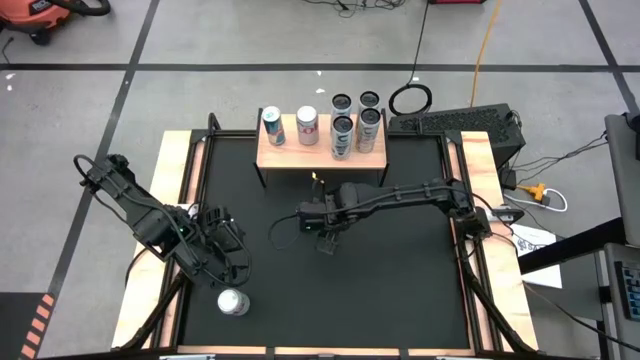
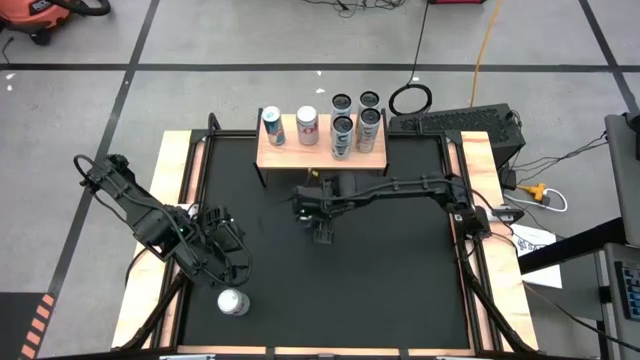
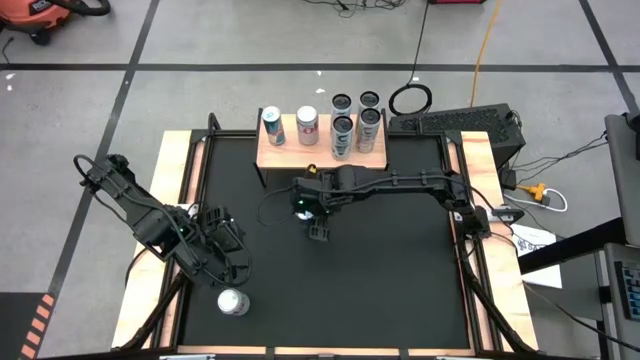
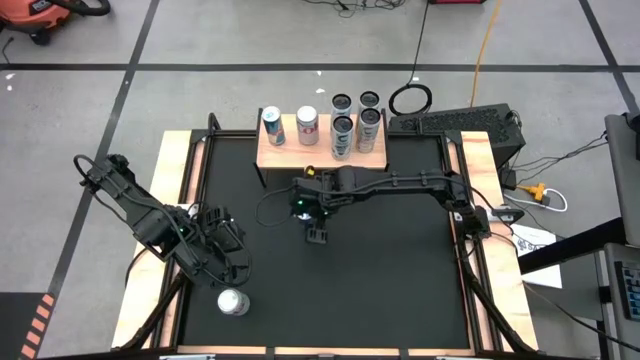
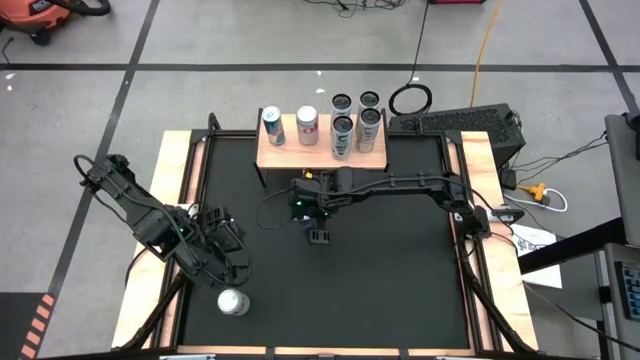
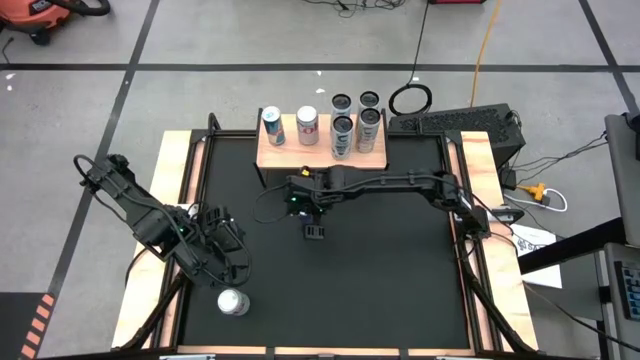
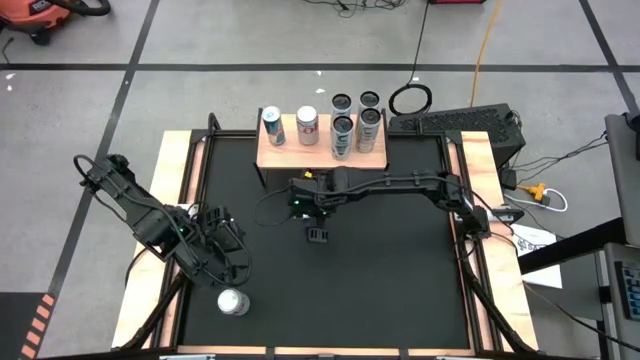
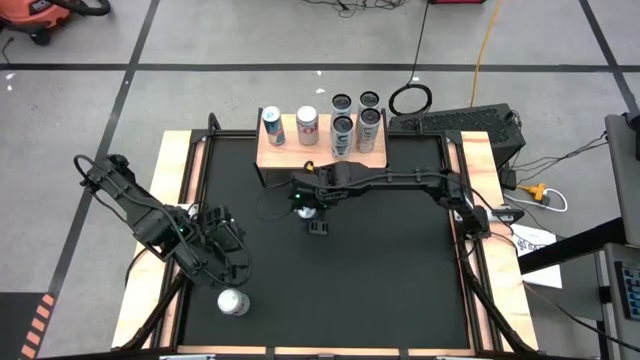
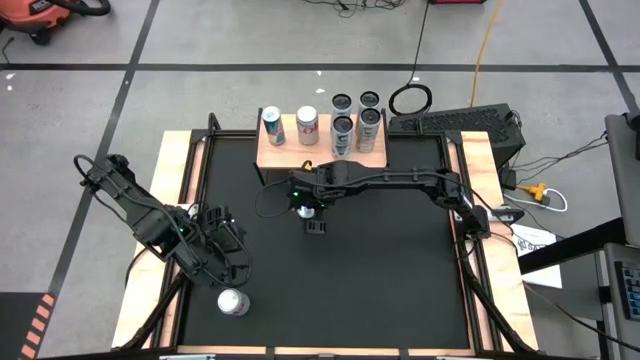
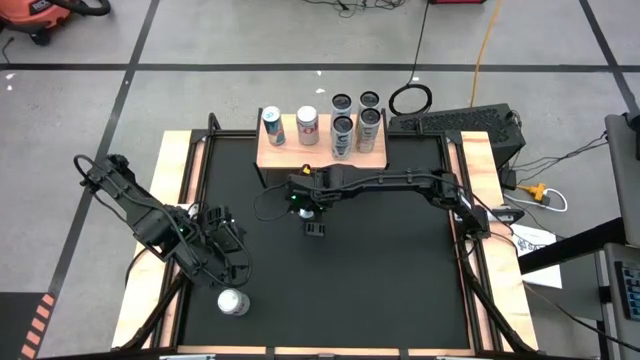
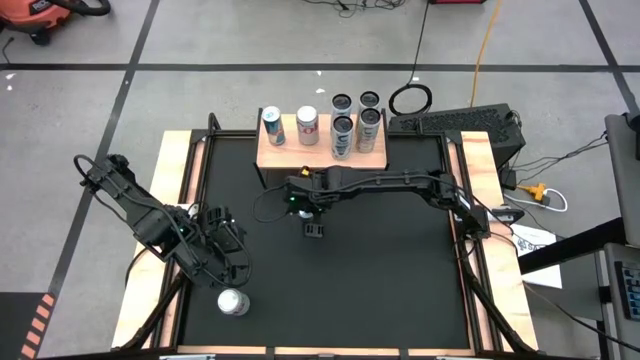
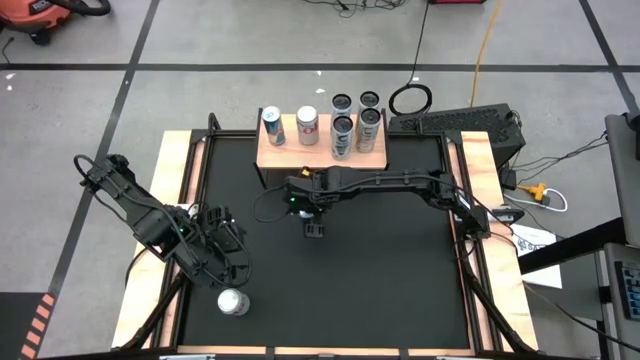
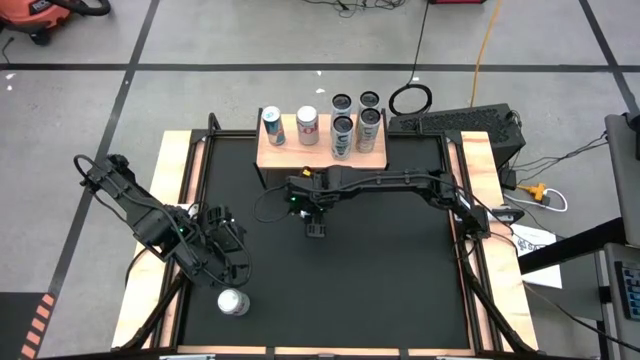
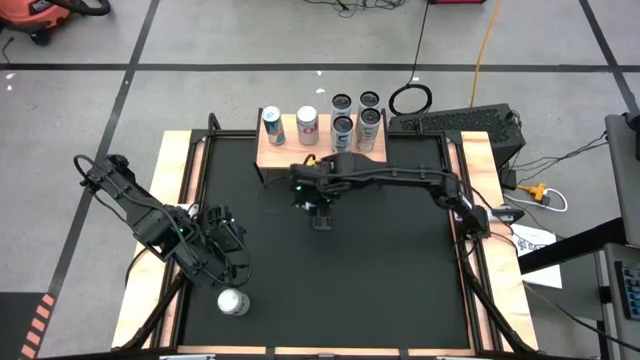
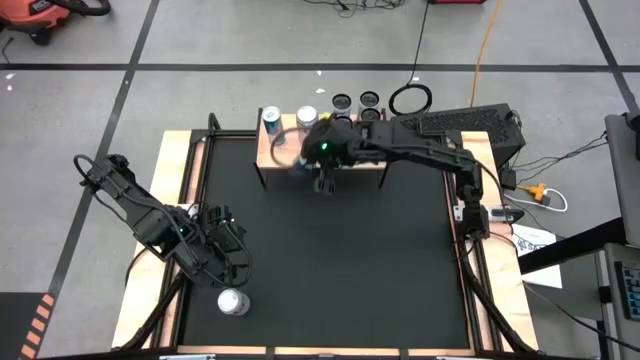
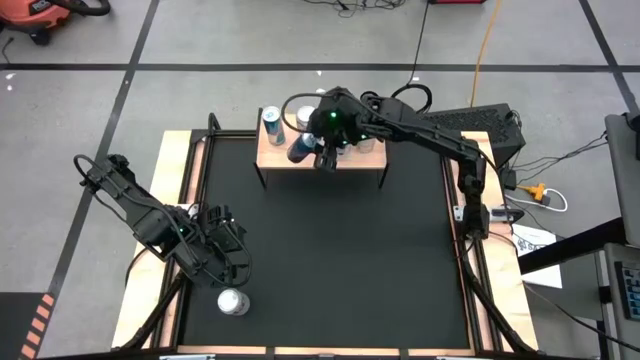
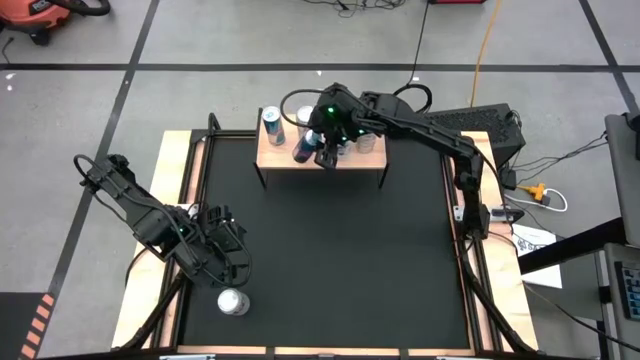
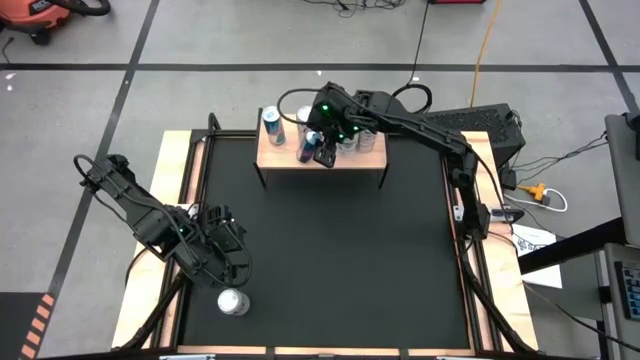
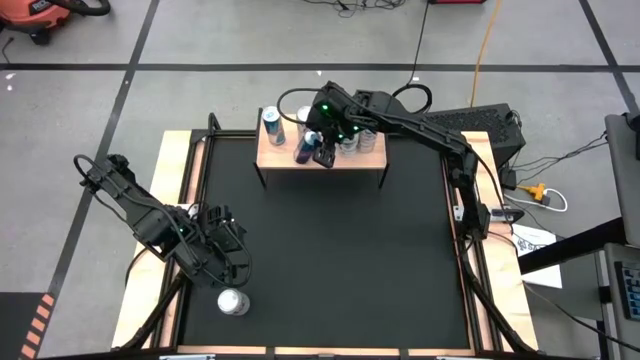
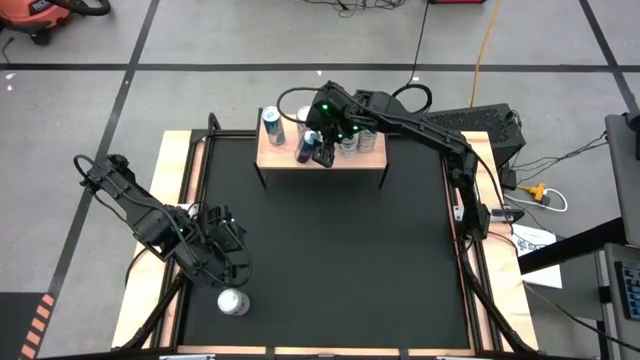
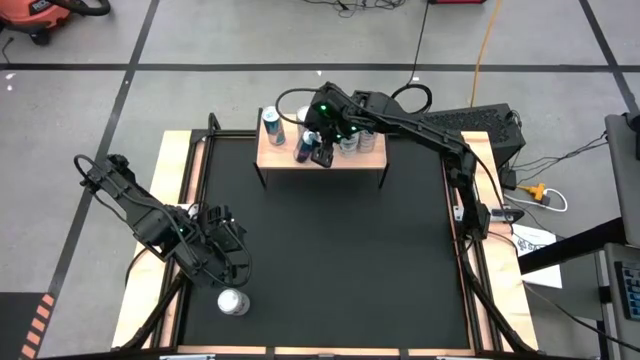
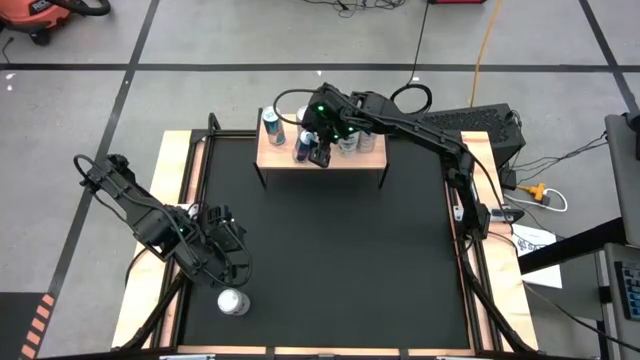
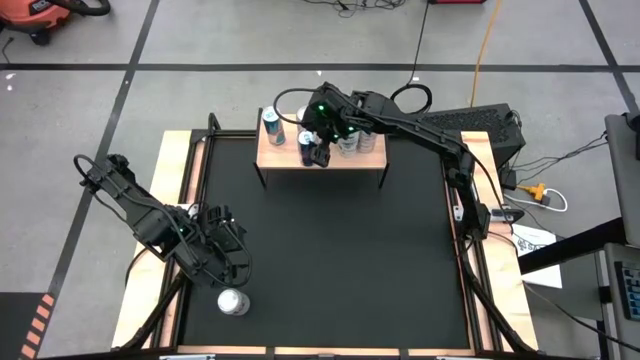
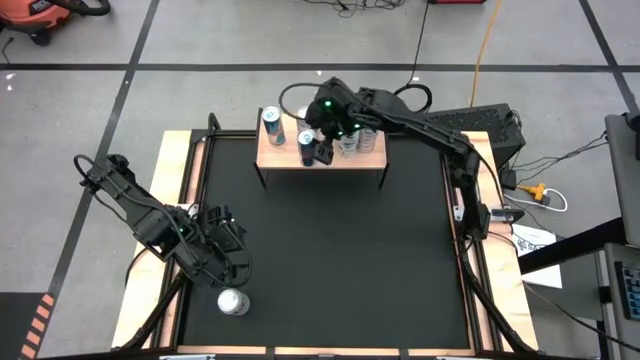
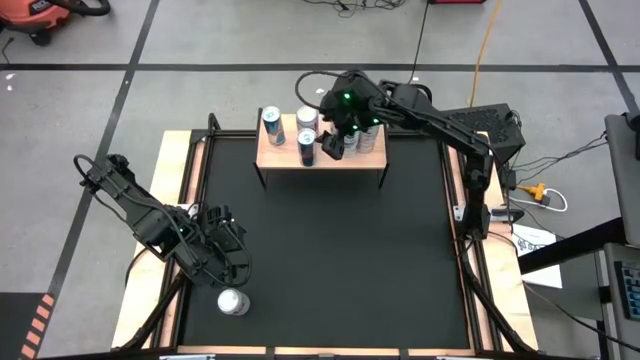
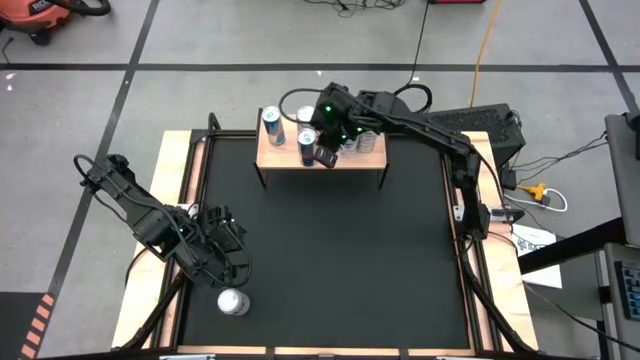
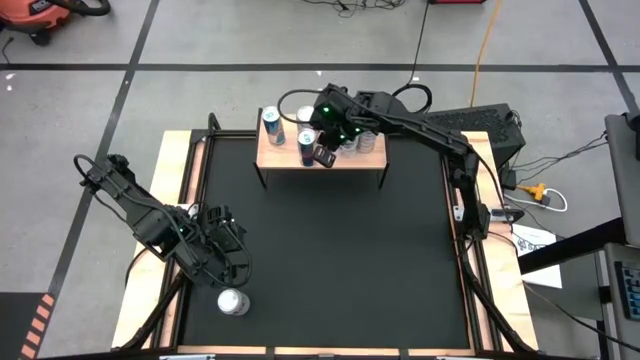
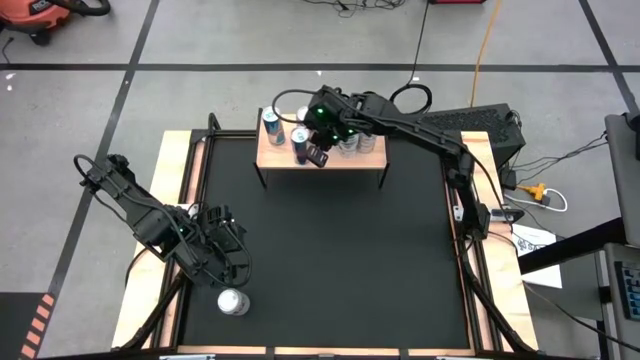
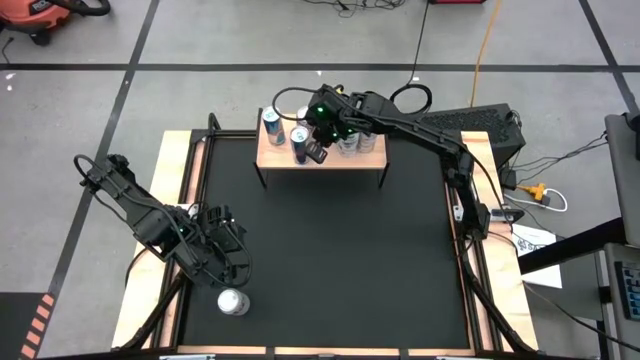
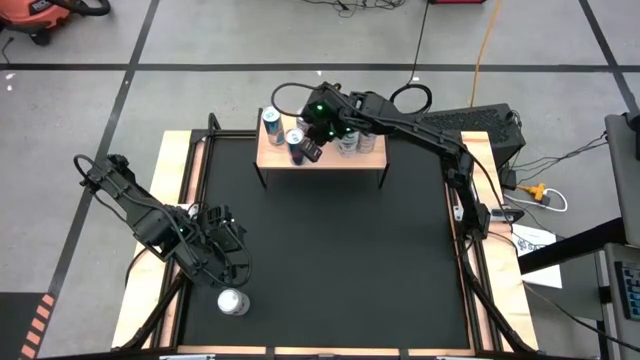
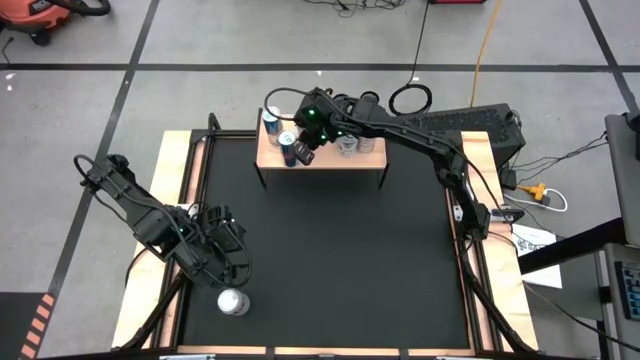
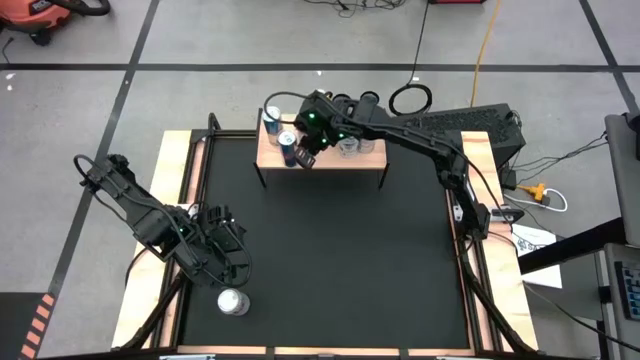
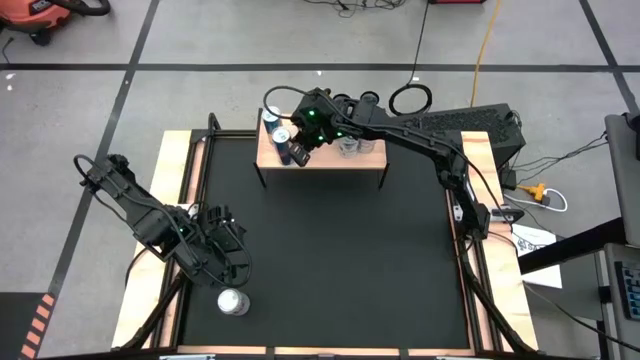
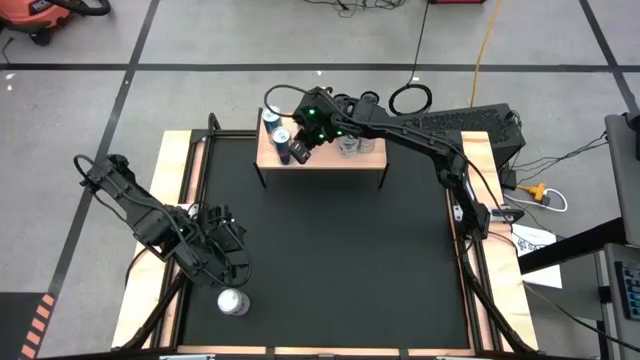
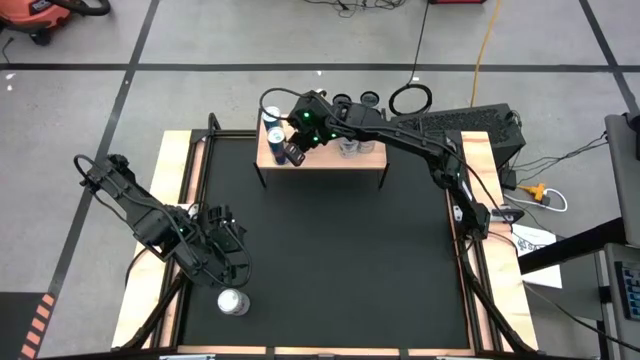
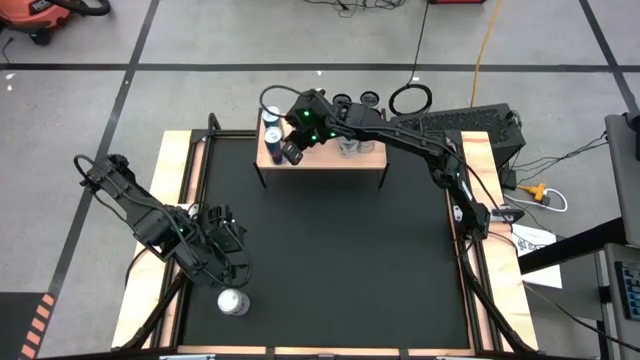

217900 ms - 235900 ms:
Task: Place canned beverage on shelf
Put the blue soda can on the shelf aligned with the other blue soda can

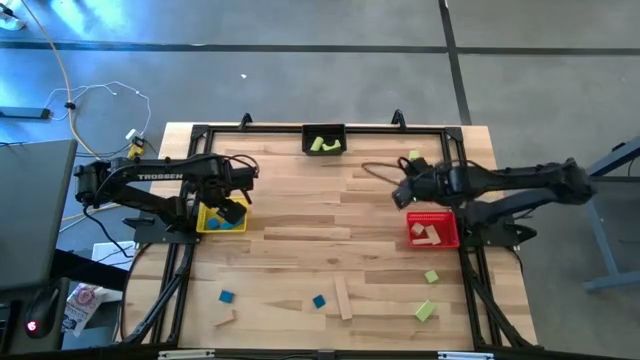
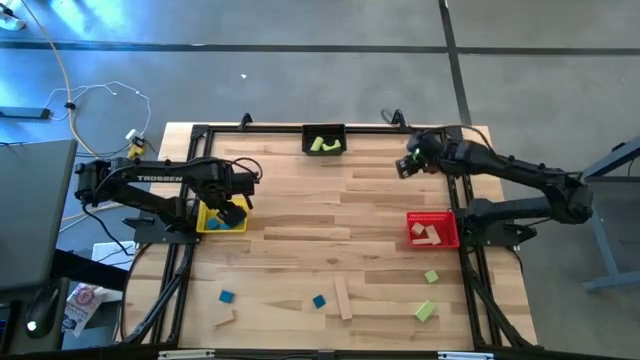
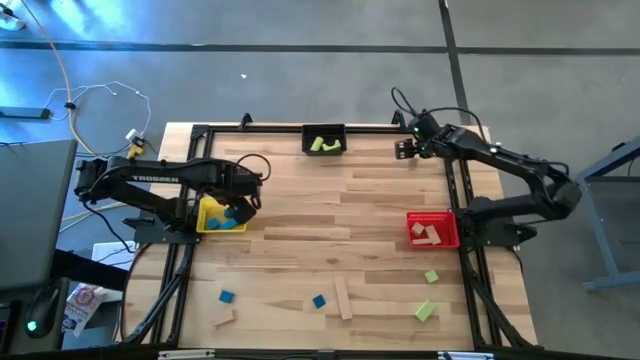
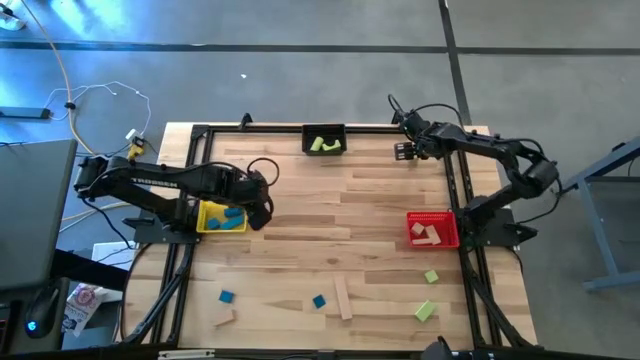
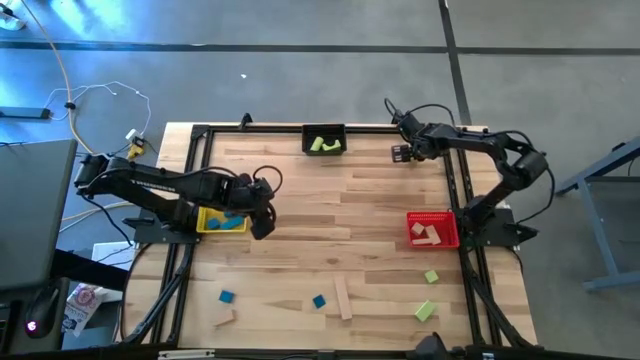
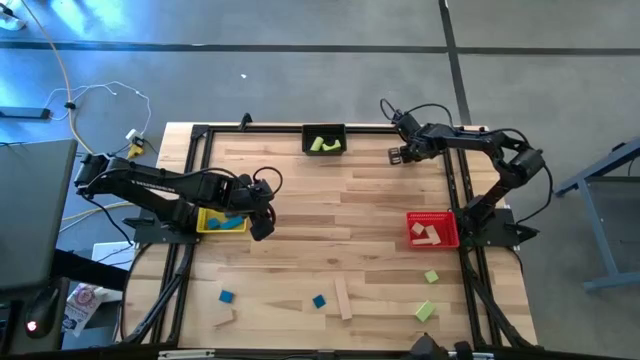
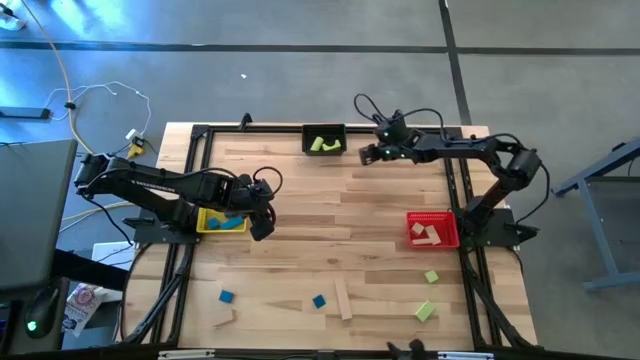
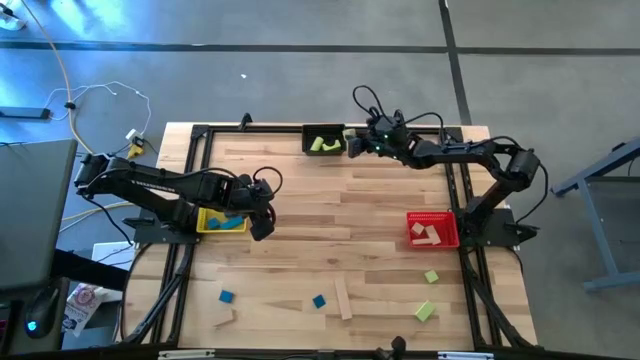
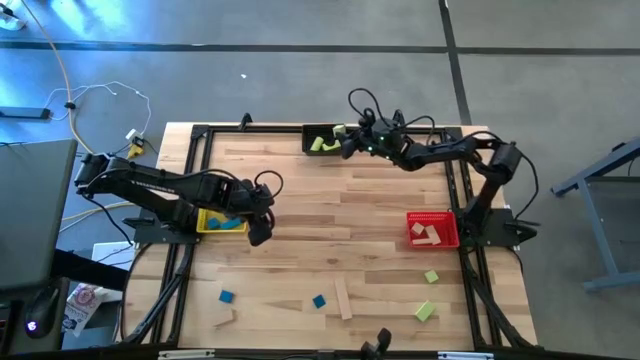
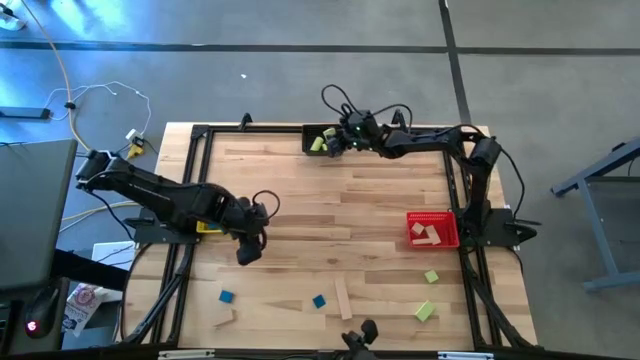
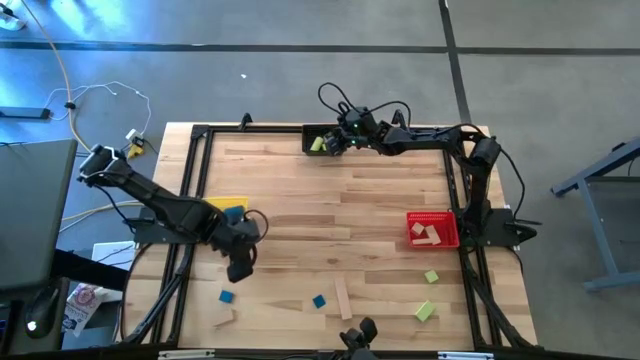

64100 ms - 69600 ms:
Task: Sort & place blocks by color
Put the light green block into the black bin
